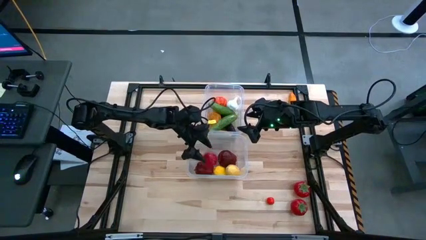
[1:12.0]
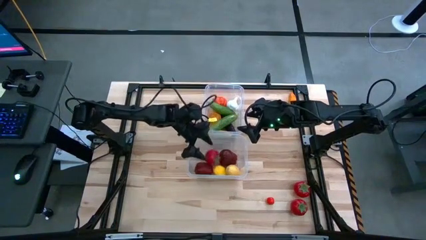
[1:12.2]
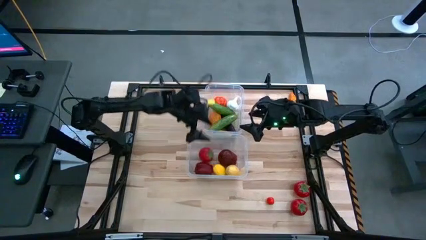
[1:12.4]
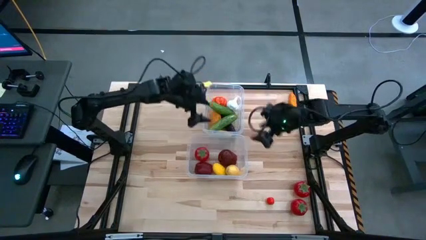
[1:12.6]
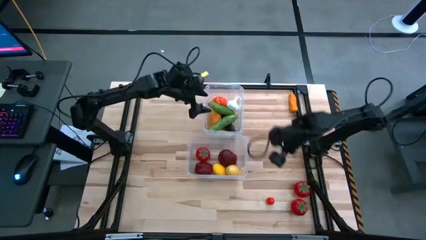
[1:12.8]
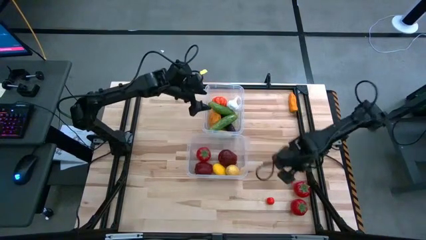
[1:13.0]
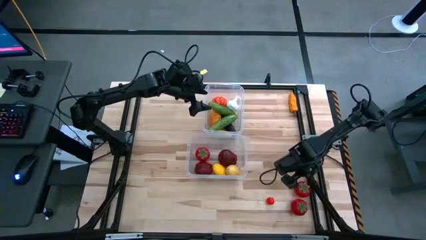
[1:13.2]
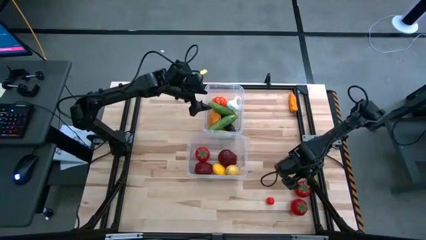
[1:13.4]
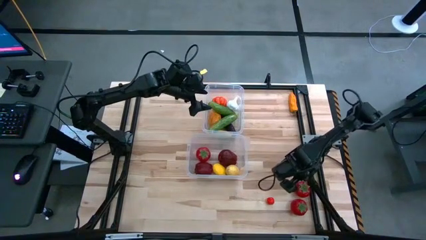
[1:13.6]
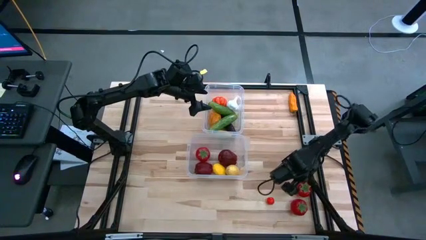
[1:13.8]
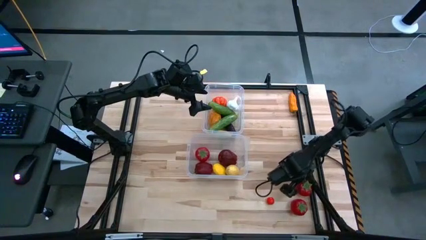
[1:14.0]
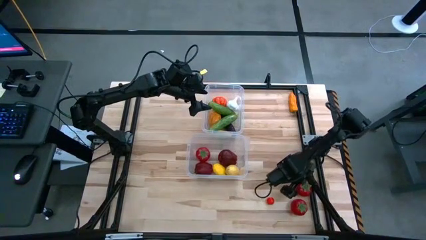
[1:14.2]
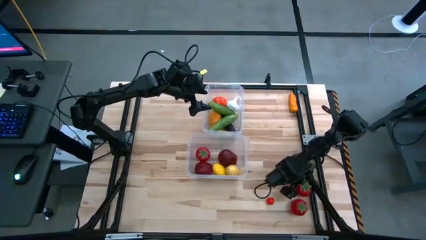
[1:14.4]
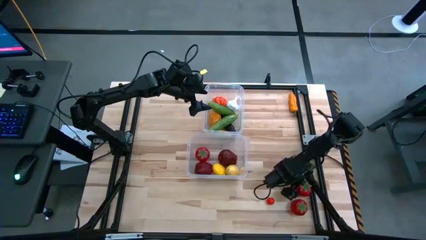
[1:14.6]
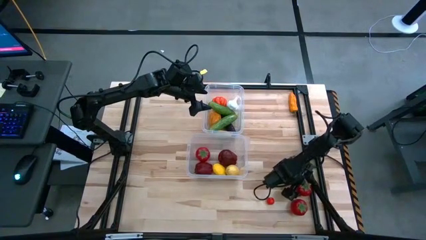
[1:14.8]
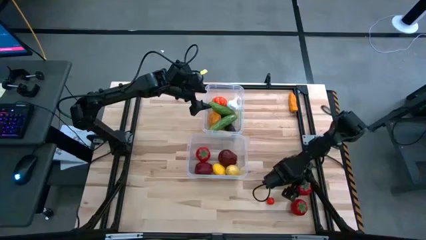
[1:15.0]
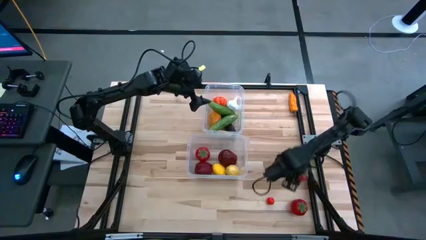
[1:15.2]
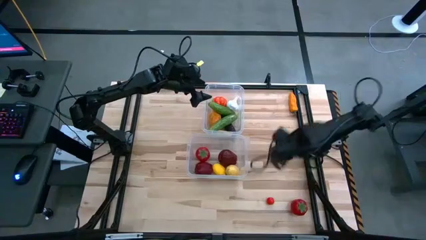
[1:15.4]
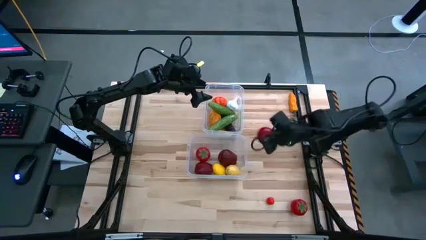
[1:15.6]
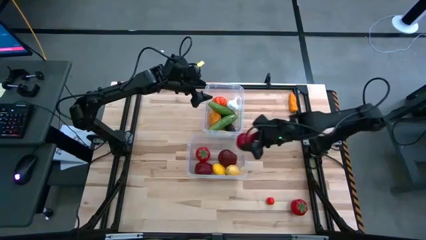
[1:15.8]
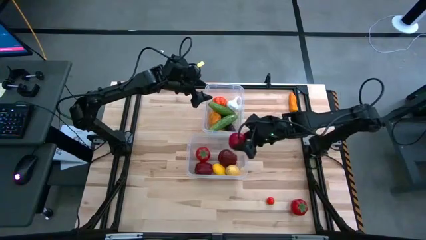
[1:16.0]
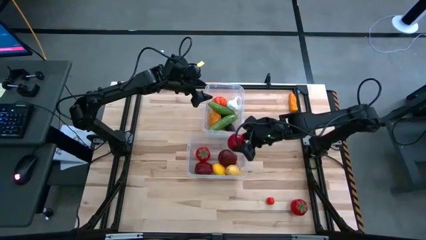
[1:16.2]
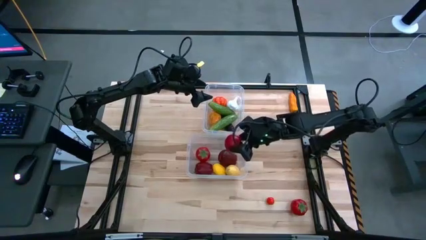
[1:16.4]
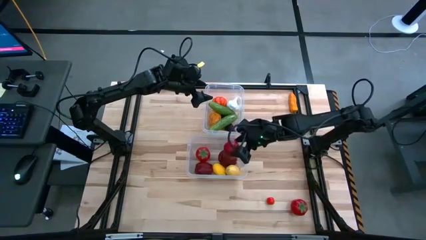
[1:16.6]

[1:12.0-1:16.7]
Task: Sort produce into baskets
Put the red tomato into the bottom transparent bin

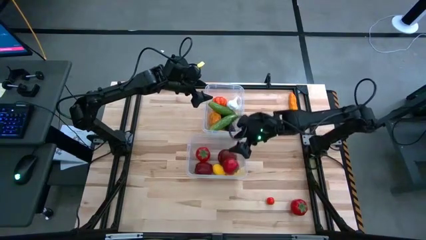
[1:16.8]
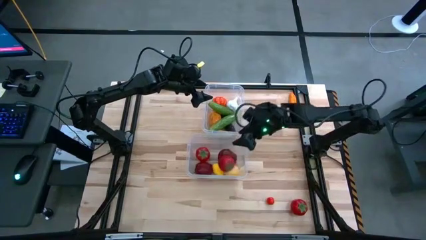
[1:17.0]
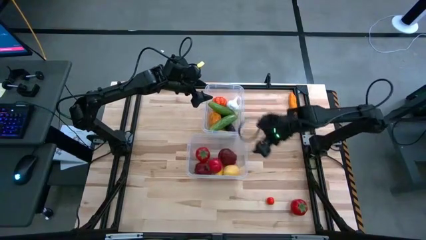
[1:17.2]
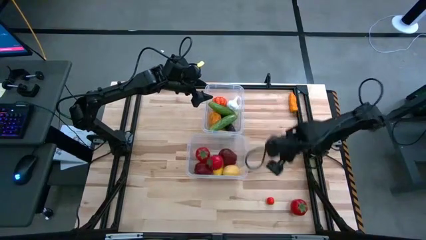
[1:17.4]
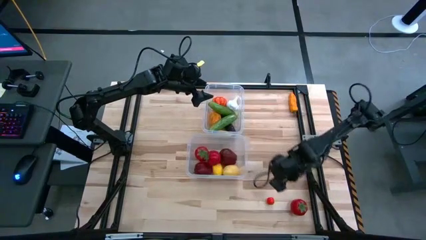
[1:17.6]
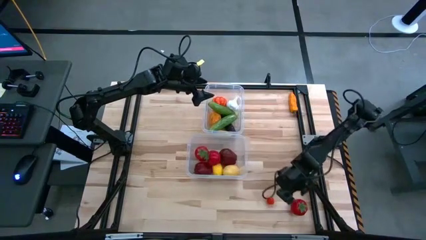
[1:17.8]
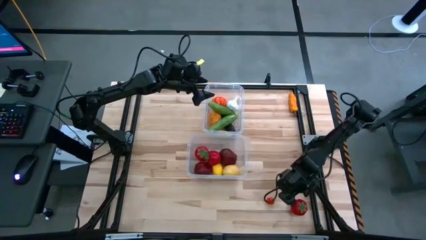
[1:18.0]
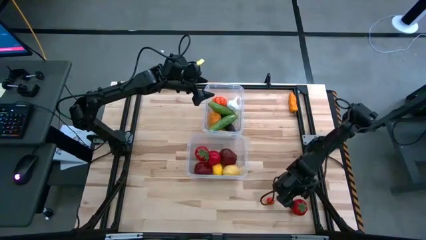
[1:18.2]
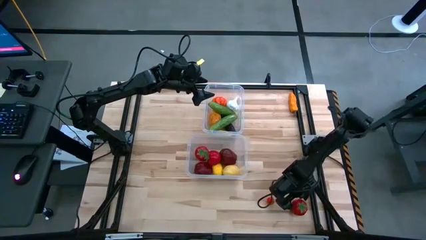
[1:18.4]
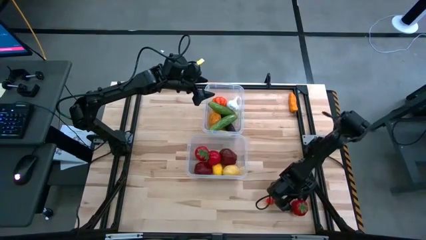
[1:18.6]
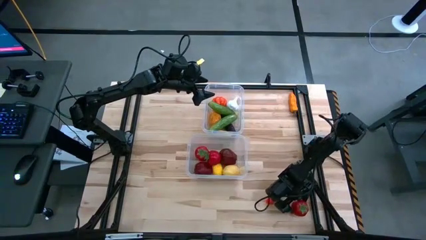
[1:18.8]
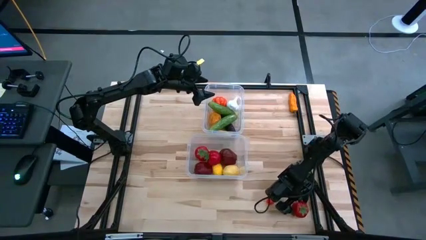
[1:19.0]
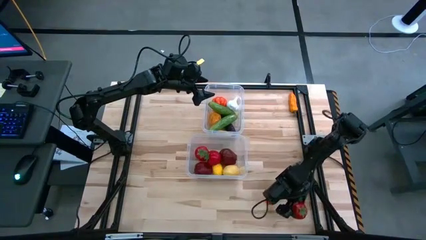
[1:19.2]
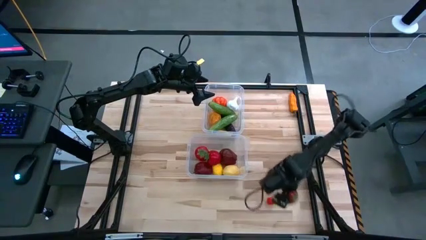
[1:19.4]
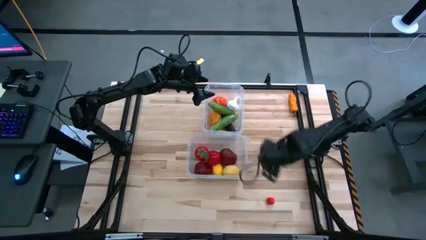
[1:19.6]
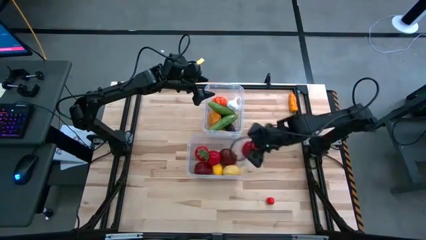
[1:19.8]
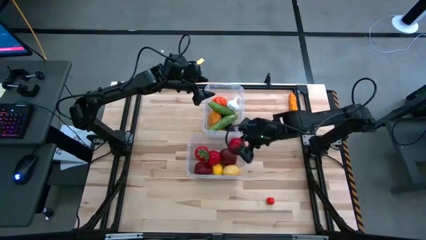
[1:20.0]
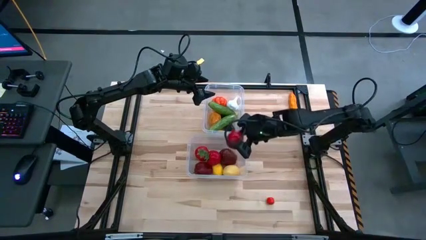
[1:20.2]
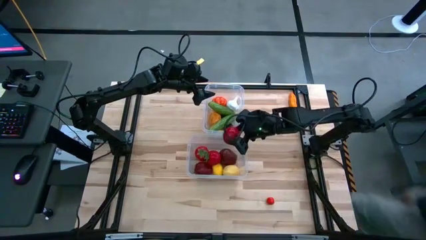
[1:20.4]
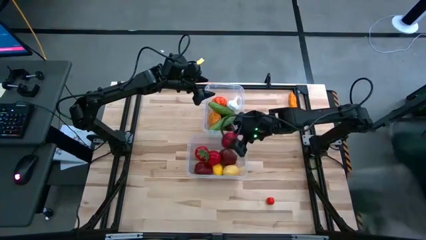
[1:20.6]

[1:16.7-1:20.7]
Put the red tomato into the bottom transparent bin

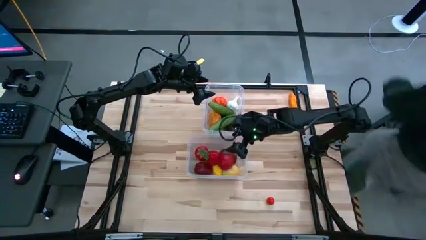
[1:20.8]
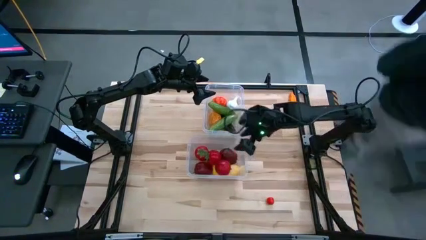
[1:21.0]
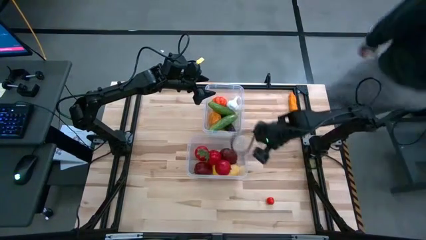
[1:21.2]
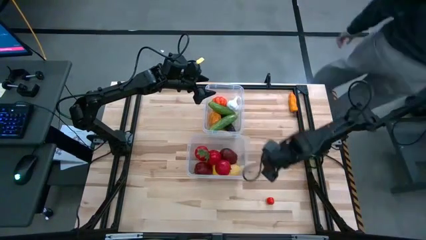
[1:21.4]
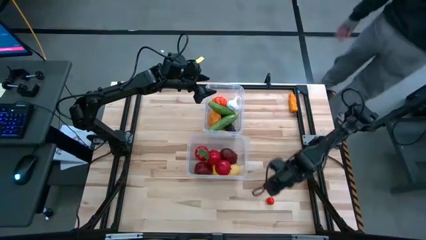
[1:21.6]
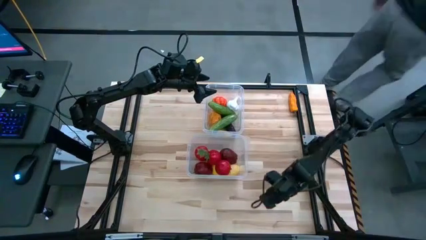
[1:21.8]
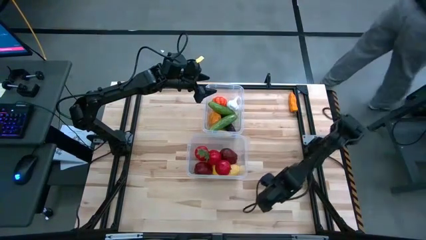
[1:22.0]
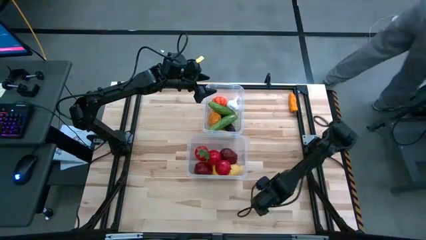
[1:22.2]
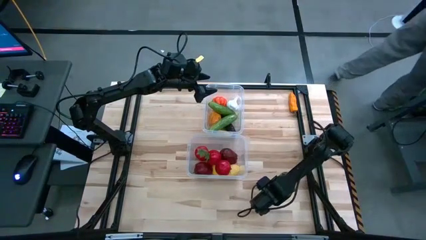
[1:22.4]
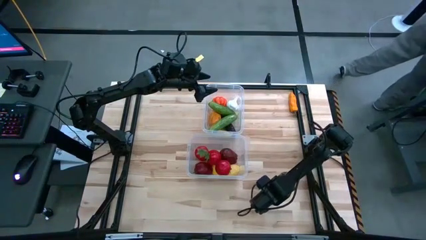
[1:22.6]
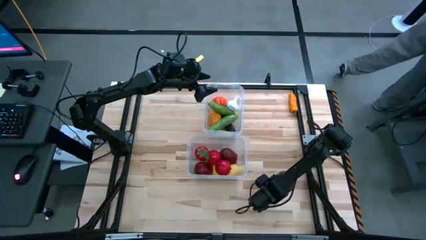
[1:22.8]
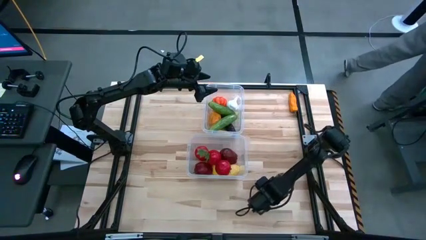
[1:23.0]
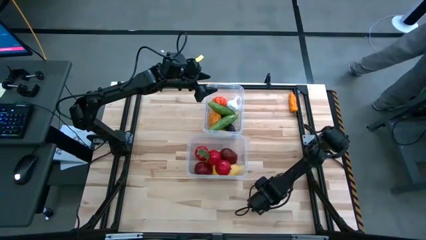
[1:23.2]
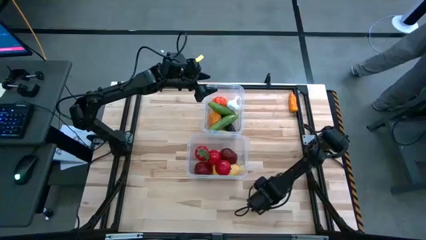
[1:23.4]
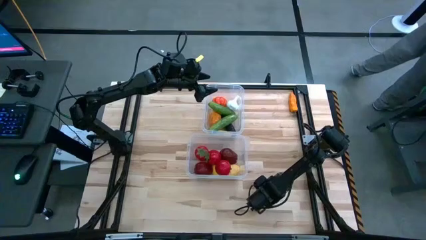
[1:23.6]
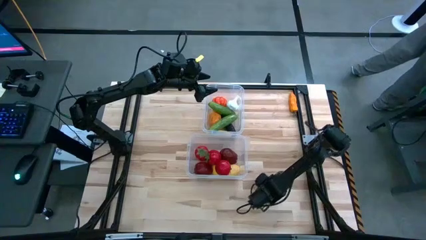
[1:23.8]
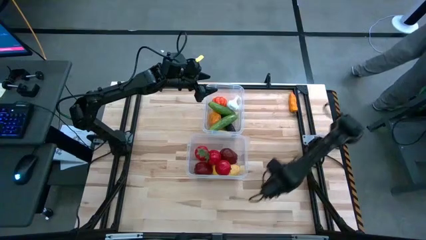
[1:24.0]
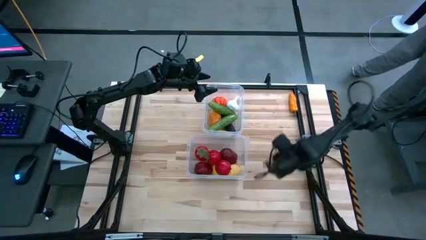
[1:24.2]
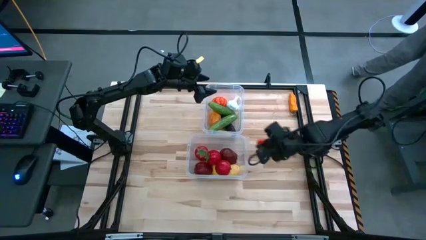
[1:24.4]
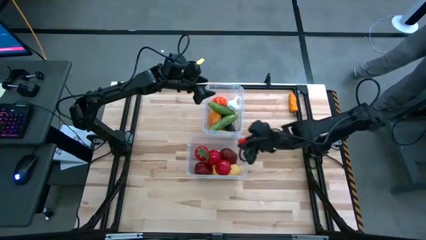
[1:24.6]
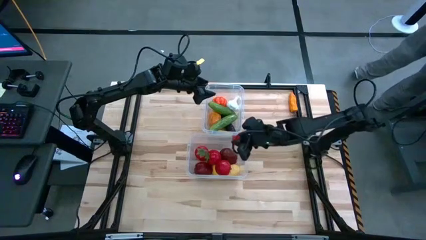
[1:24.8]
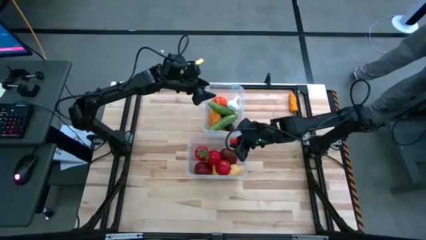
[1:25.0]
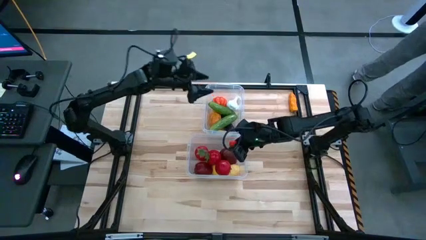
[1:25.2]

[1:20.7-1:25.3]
Put the red tomato into the bottom transparent bin

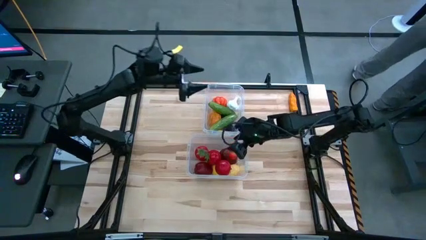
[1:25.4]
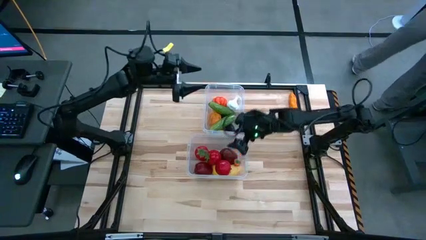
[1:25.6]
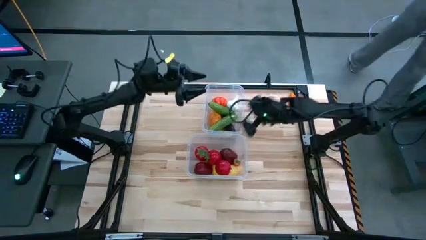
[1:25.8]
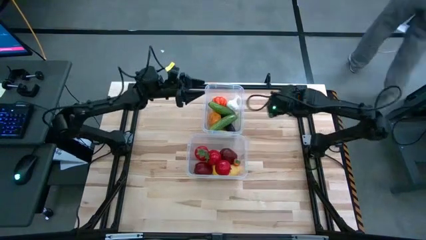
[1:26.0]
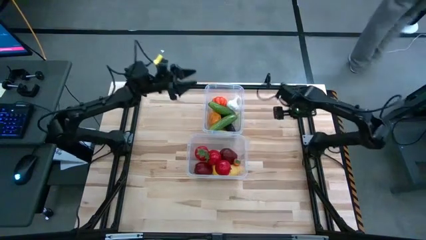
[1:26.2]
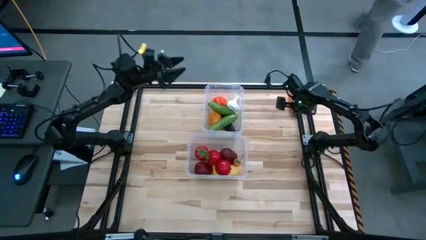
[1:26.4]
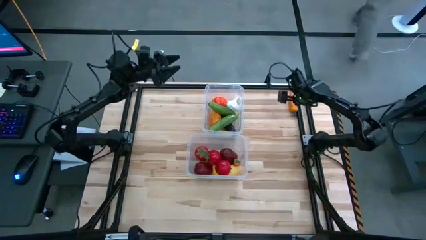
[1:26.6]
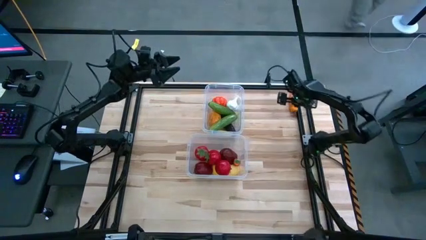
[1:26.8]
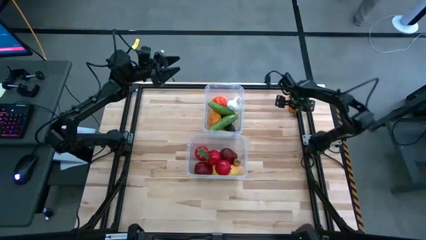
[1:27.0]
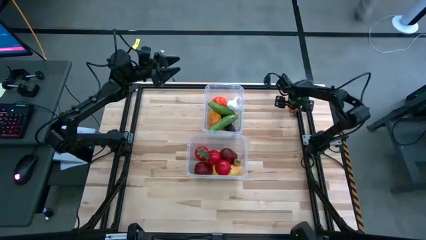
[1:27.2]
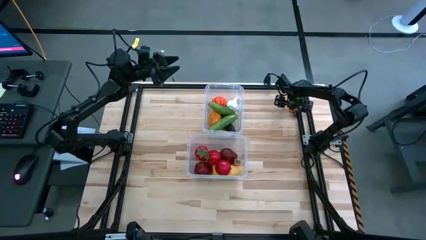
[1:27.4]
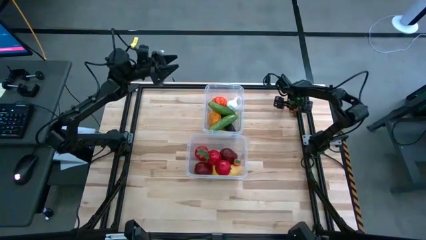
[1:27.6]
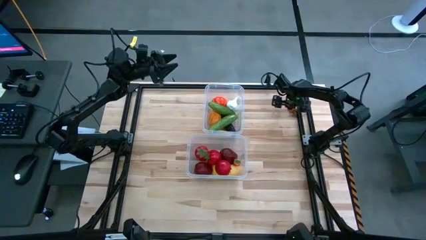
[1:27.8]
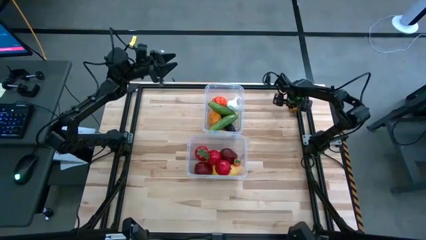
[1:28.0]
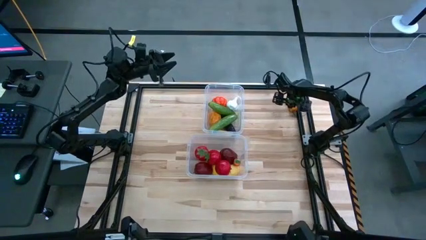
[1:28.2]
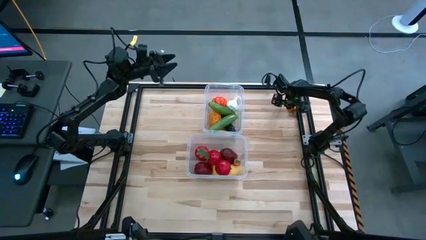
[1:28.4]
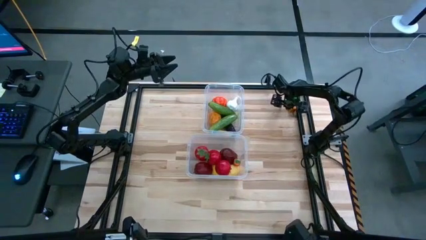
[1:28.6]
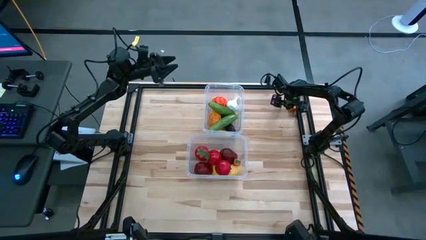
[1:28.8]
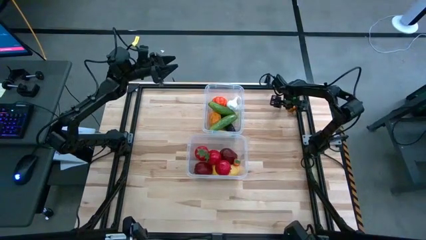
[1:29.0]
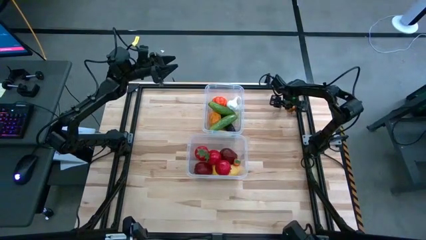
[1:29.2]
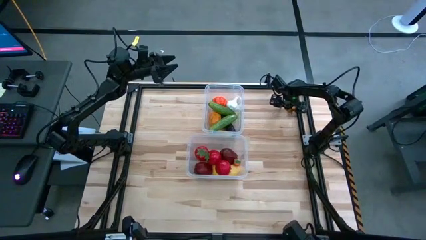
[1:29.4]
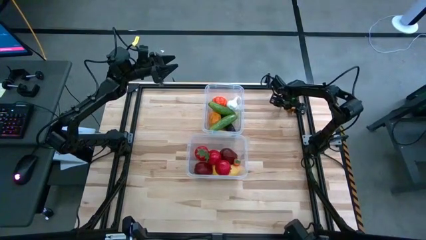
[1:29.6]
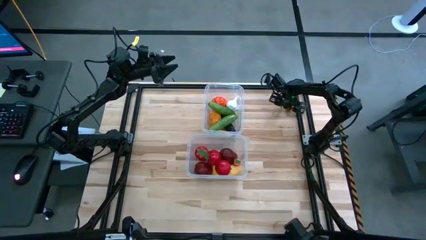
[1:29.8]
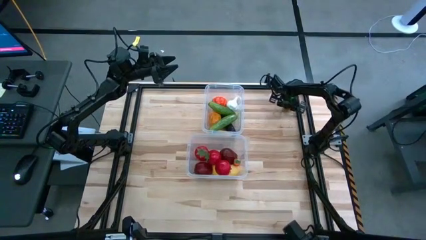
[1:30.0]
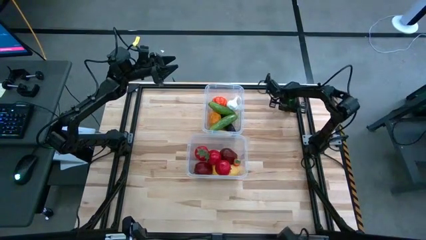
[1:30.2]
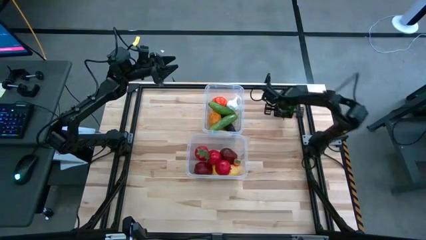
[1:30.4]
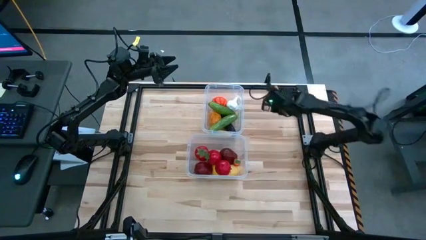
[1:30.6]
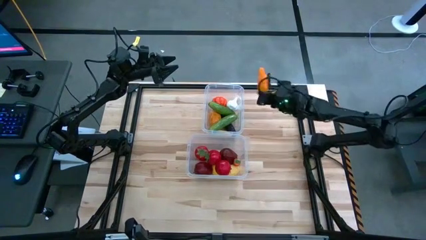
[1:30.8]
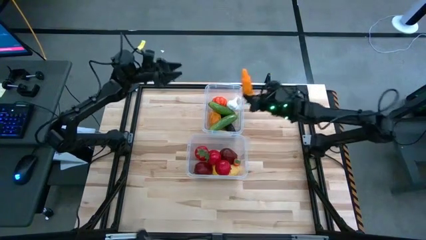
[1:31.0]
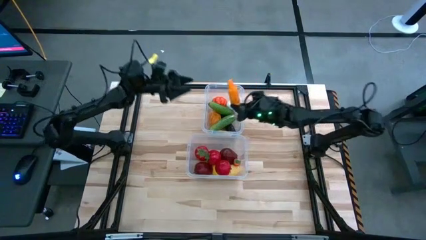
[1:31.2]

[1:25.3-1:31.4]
Put the orange chili pepper into the bottom transparent bin
